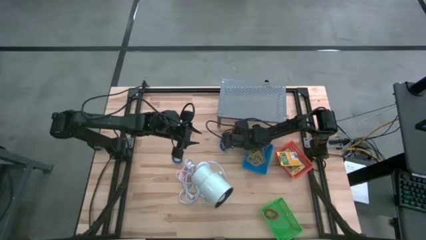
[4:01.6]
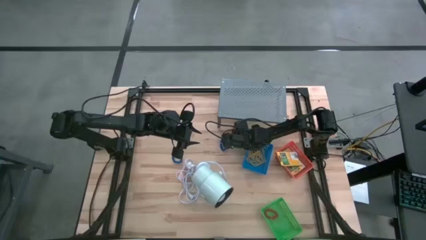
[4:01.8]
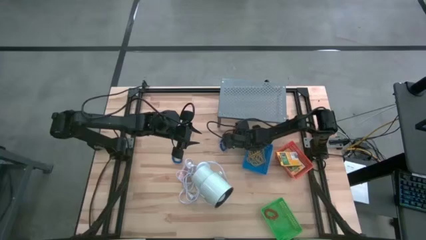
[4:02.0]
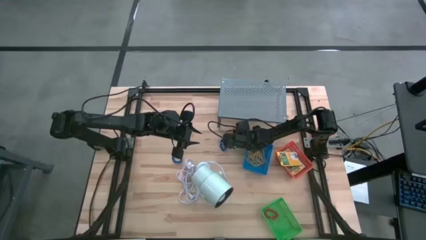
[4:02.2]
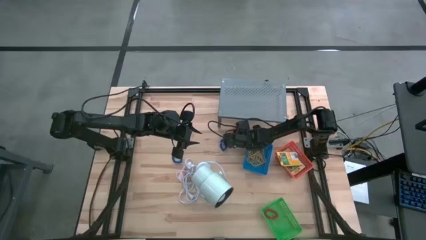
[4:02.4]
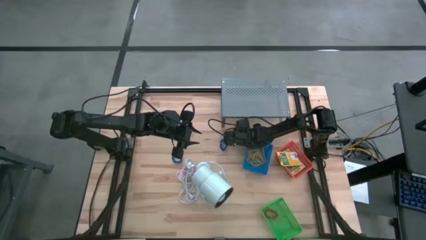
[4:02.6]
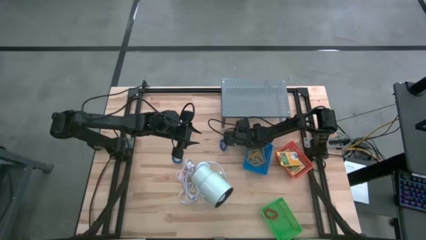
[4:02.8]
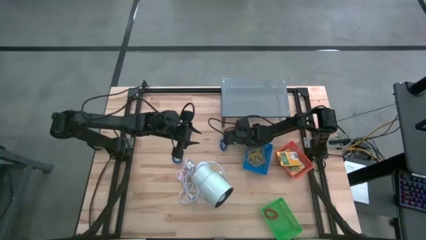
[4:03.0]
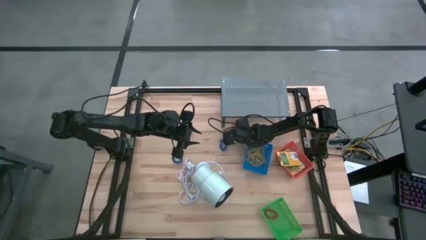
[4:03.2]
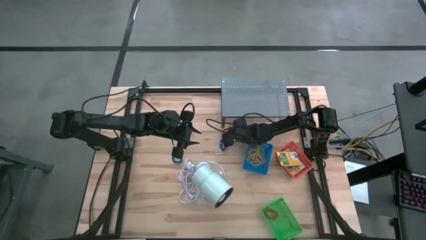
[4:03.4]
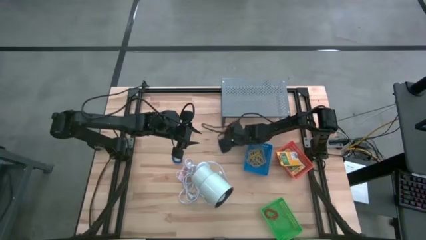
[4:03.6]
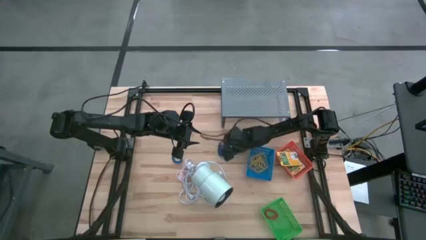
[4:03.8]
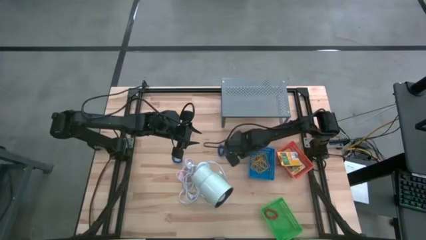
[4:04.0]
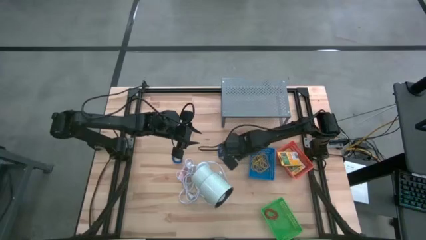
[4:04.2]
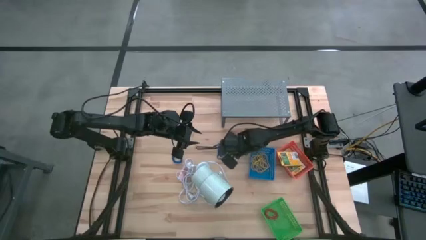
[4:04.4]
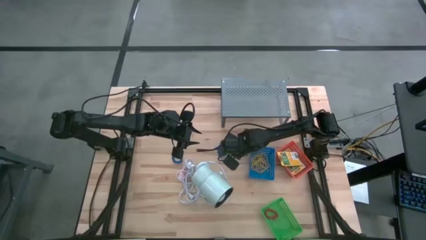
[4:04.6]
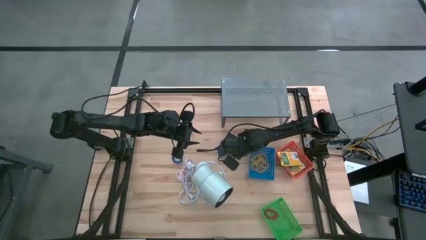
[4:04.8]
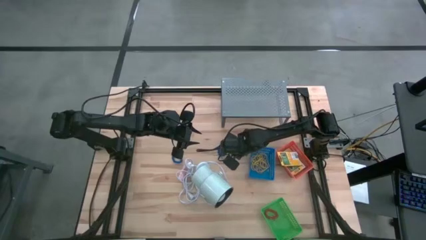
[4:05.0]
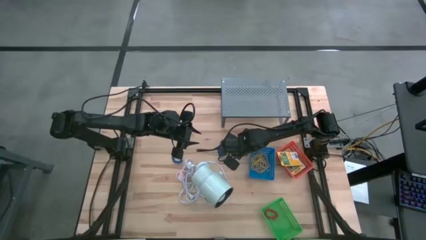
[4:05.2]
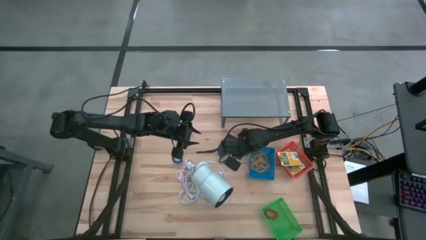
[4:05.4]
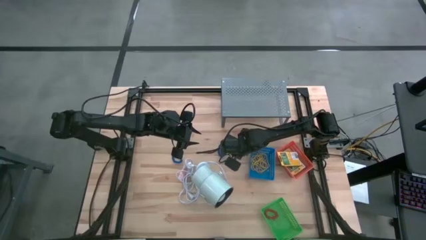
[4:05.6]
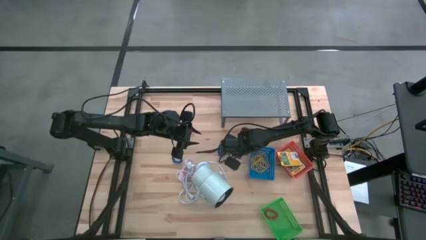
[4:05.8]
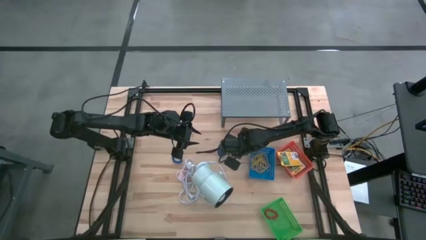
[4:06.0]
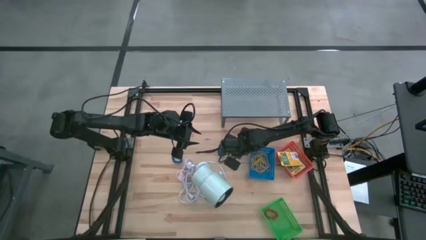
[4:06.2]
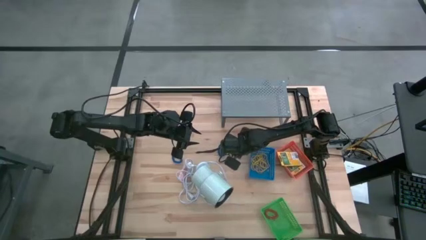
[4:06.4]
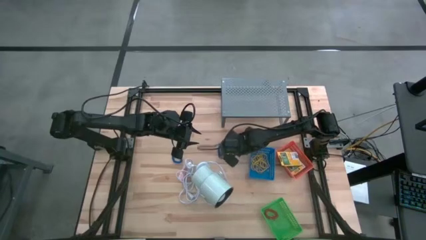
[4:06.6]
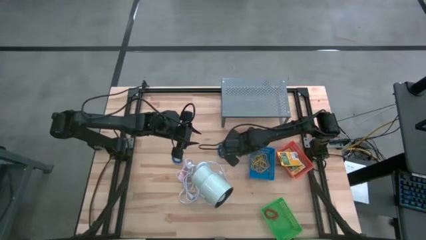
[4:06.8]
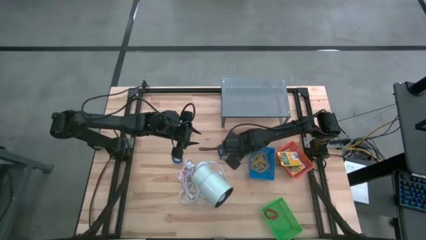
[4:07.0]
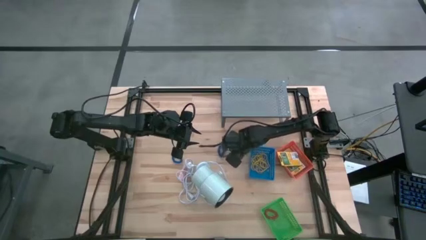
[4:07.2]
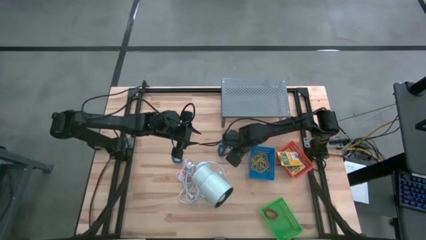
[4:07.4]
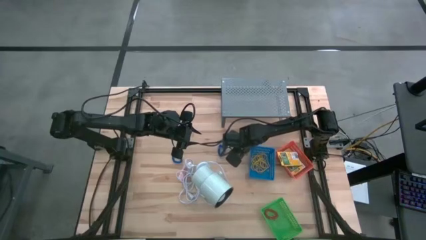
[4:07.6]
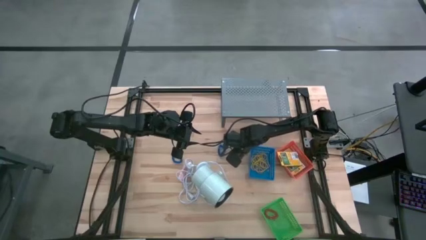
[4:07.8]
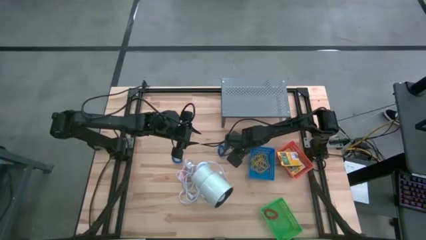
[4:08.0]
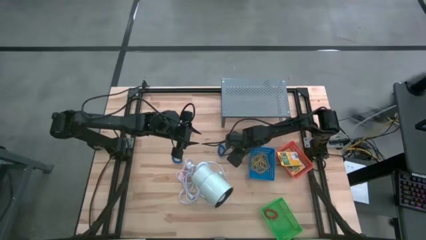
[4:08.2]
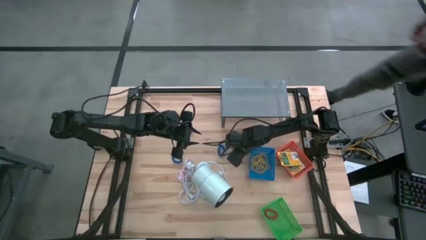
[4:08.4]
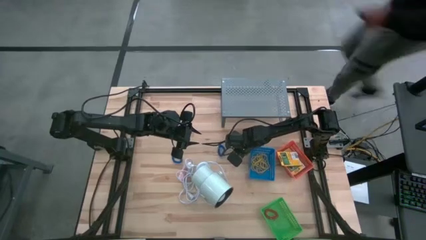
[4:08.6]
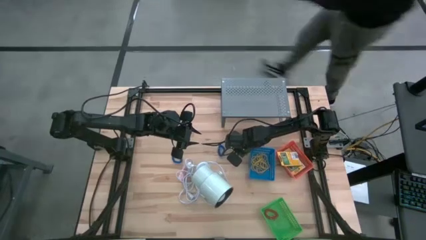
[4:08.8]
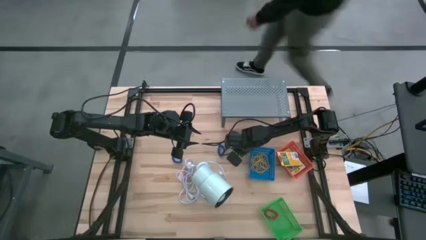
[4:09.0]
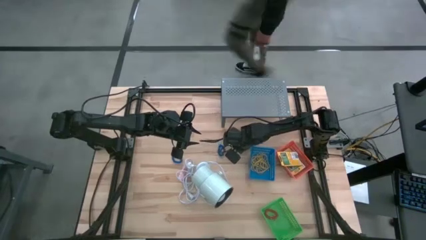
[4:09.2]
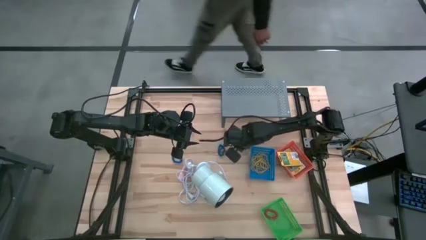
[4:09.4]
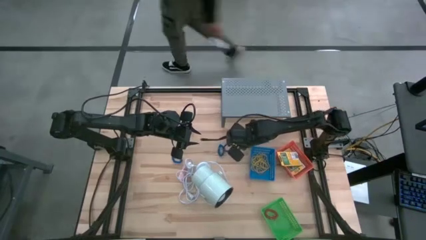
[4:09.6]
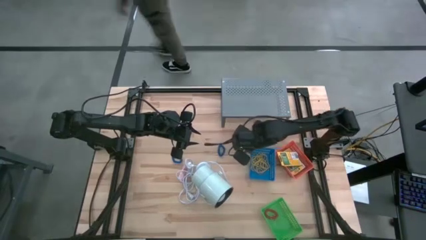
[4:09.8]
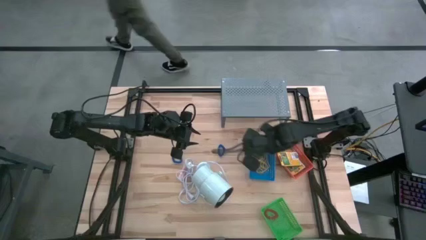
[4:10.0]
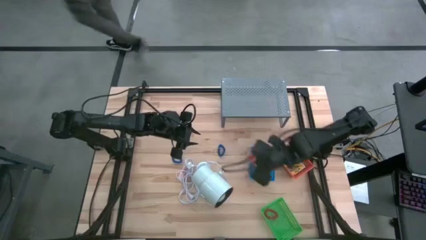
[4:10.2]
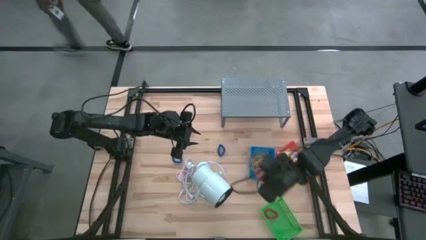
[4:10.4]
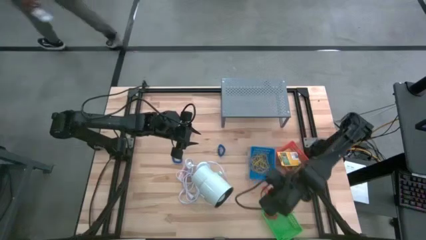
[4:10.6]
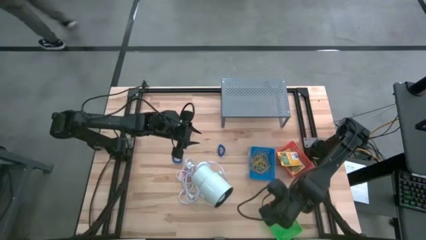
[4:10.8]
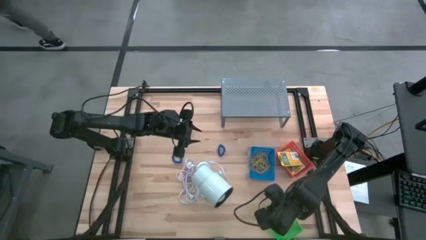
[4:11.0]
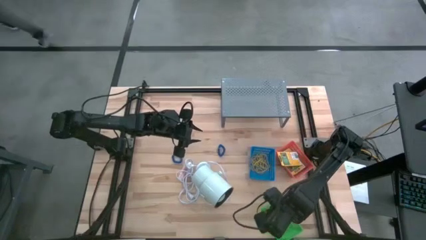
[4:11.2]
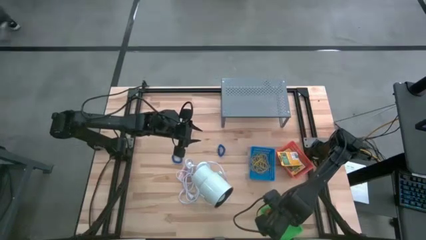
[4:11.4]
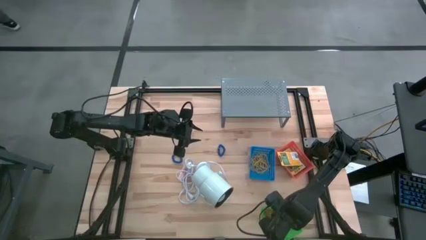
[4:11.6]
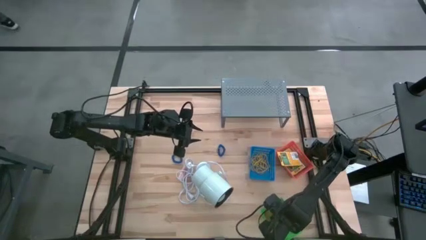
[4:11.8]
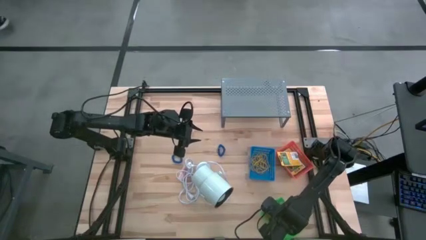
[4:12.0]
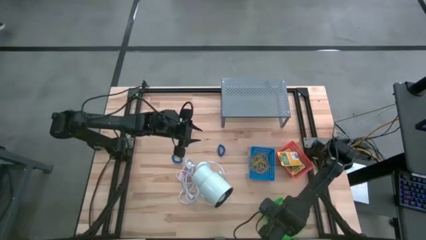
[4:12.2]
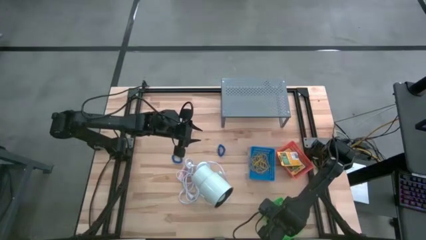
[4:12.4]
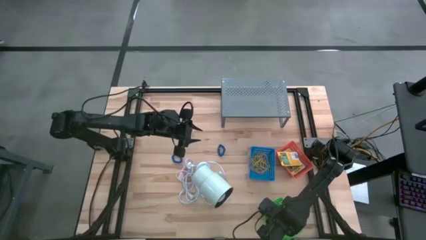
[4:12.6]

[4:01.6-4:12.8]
Task: Pick & Place Office Desk Supplies
Put the orange spring keychain into the green bin

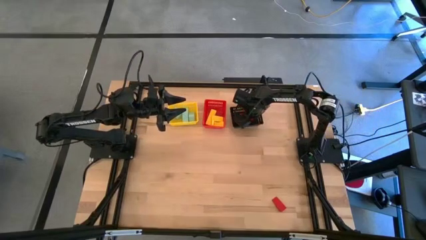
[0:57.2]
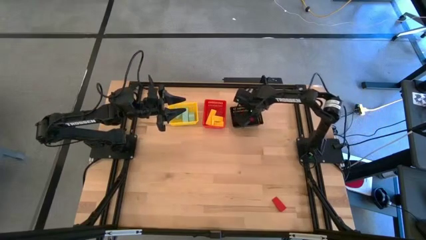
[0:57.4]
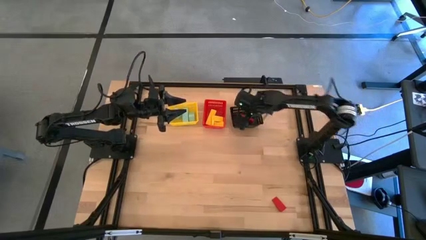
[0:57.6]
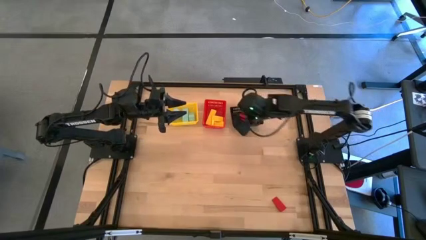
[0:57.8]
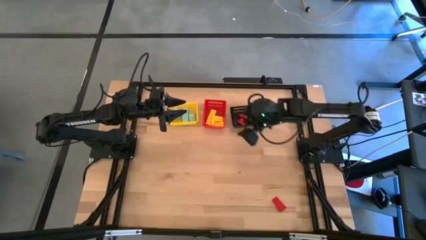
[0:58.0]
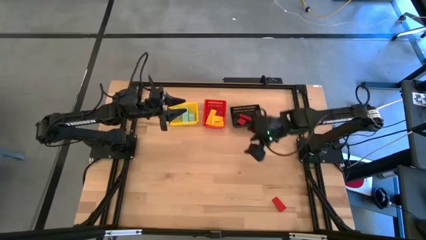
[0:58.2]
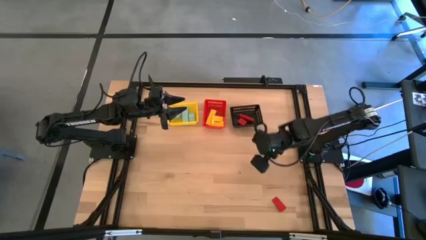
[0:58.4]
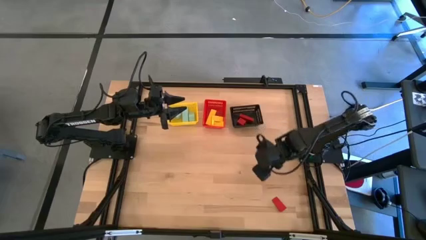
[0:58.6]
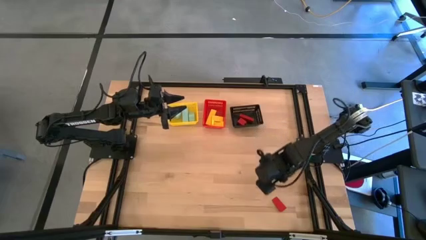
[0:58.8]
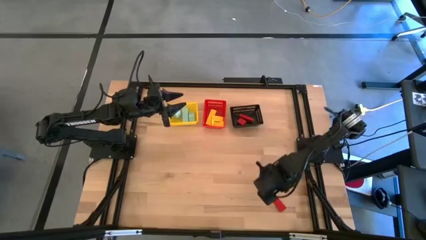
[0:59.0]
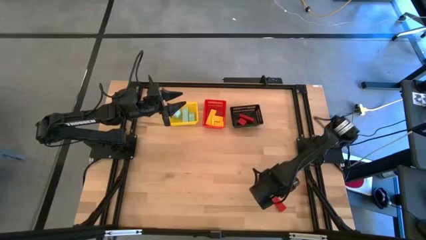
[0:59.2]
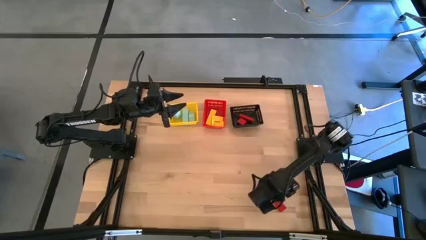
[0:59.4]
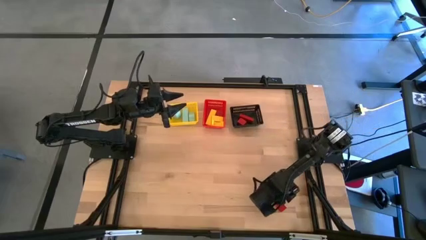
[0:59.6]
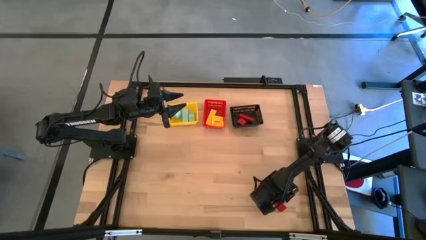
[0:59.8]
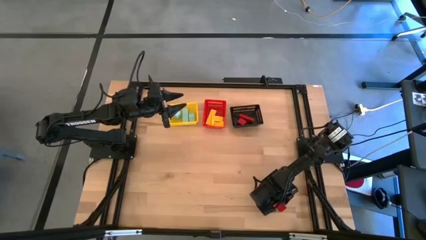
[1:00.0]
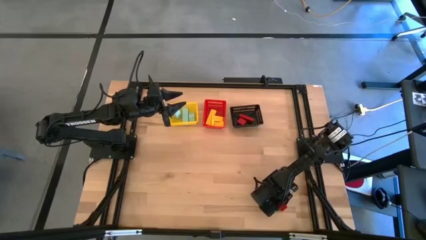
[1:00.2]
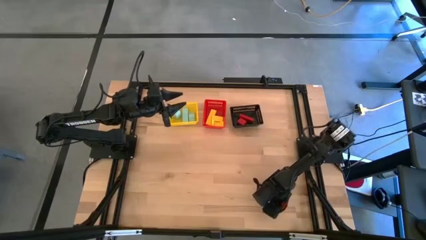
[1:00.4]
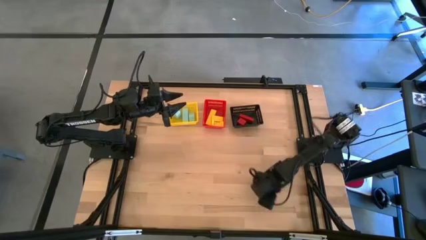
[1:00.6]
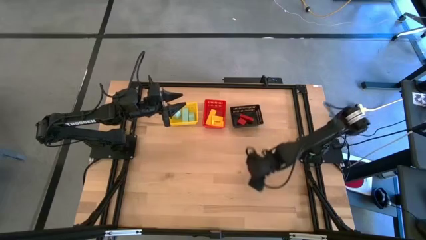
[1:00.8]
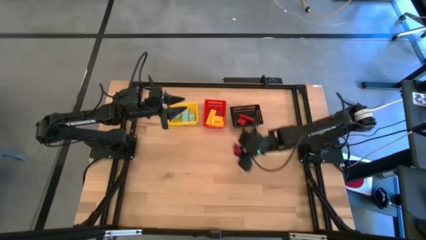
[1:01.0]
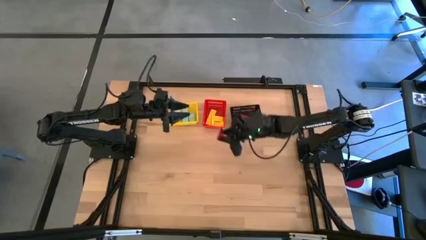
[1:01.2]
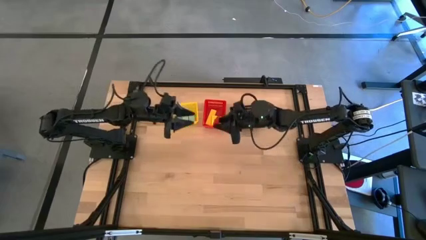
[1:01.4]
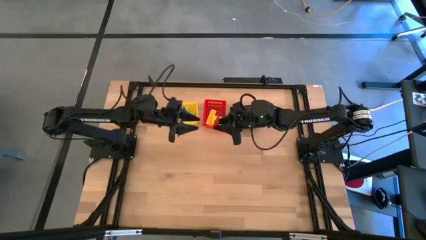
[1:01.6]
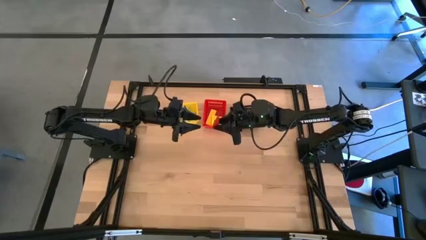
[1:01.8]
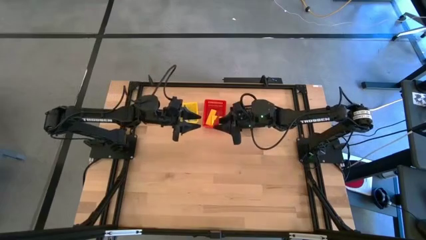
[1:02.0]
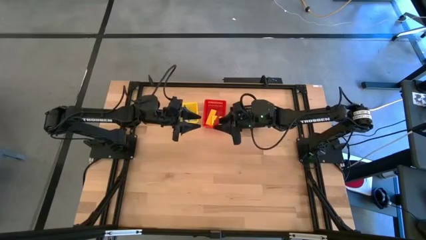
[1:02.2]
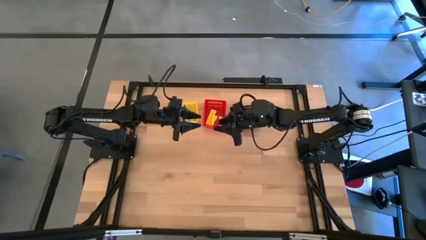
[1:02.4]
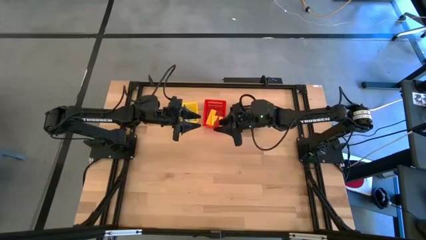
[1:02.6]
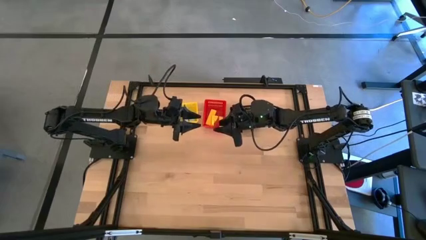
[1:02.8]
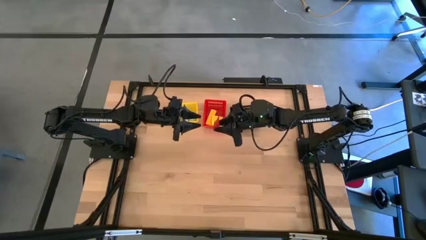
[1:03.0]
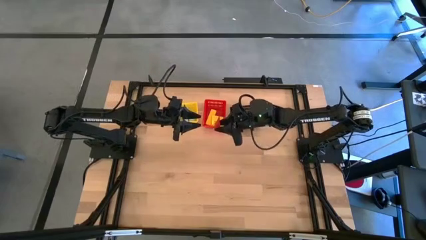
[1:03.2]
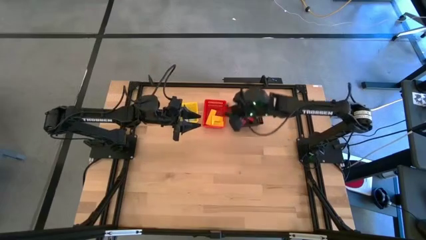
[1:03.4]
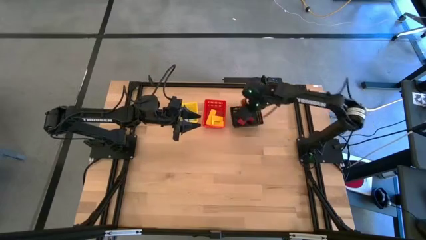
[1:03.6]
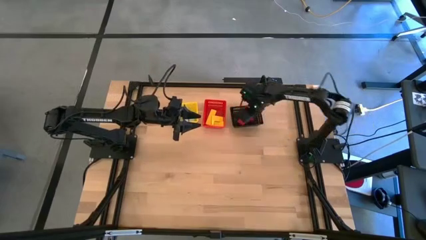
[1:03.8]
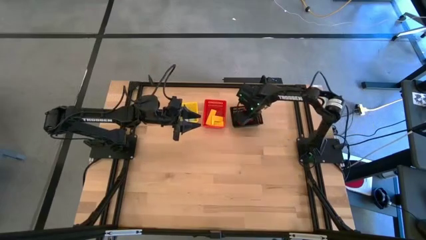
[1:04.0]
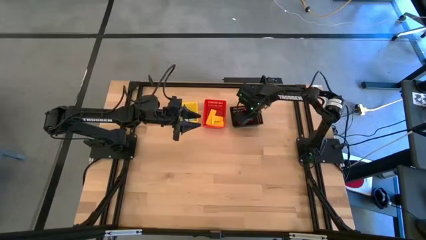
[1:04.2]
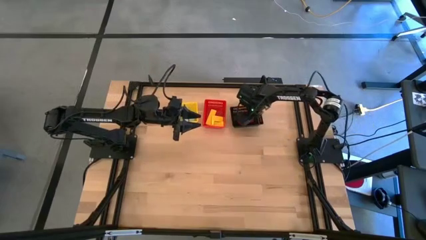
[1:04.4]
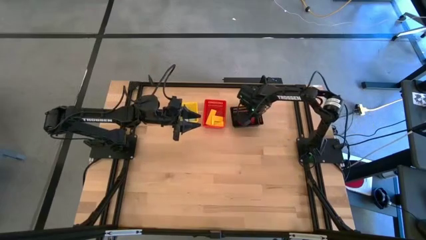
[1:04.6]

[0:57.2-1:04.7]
Task: Sort & place blocks by color
Put the red block into the black basket
